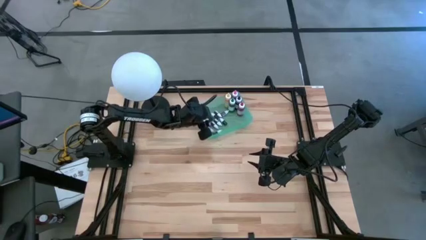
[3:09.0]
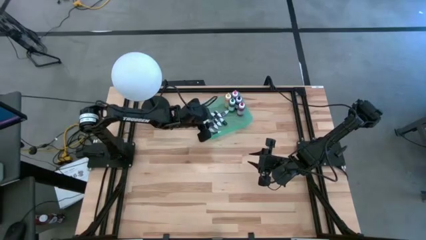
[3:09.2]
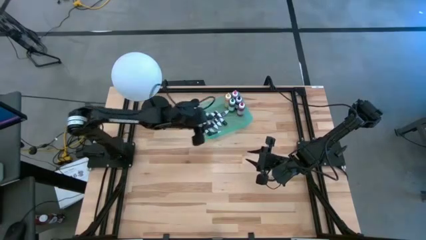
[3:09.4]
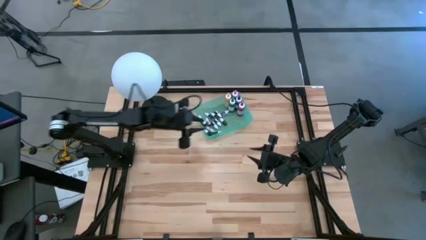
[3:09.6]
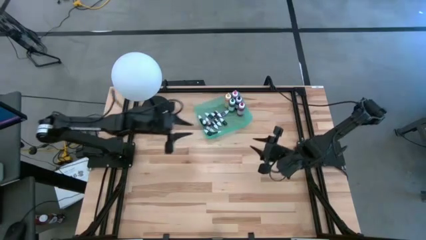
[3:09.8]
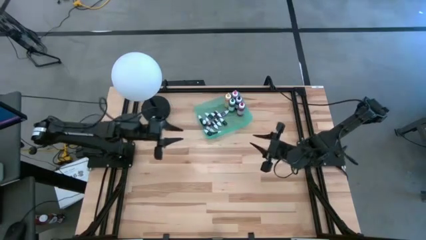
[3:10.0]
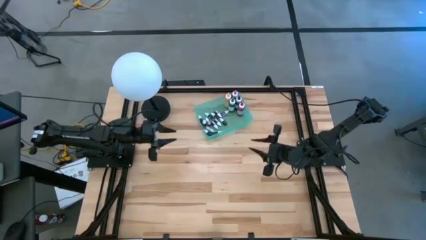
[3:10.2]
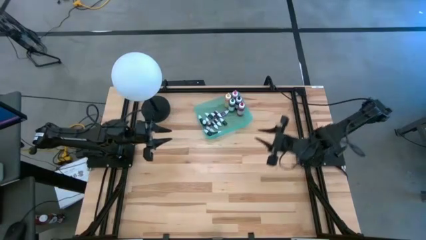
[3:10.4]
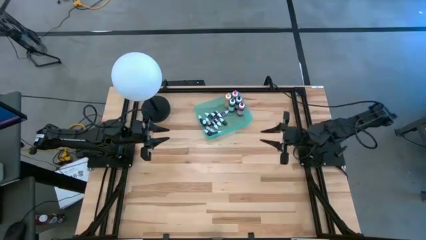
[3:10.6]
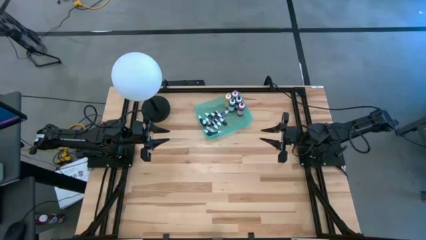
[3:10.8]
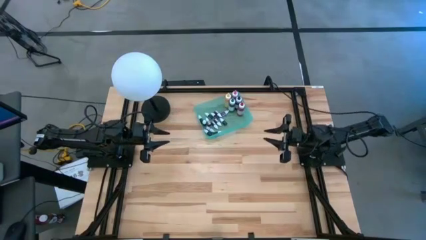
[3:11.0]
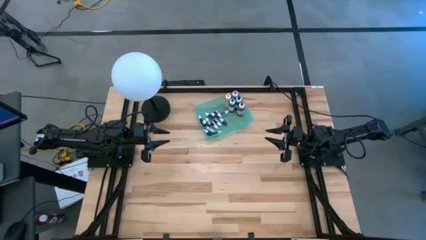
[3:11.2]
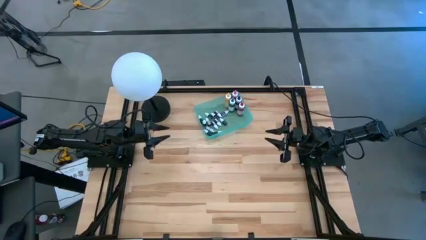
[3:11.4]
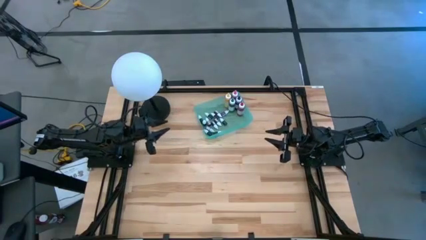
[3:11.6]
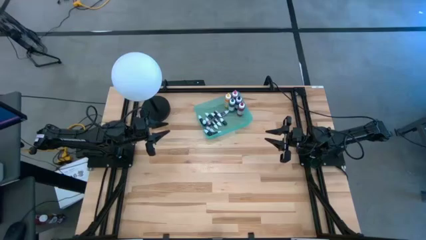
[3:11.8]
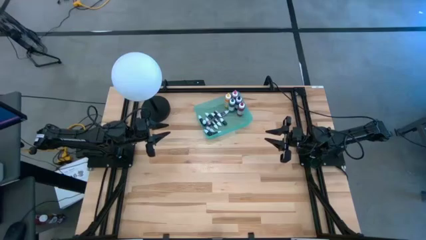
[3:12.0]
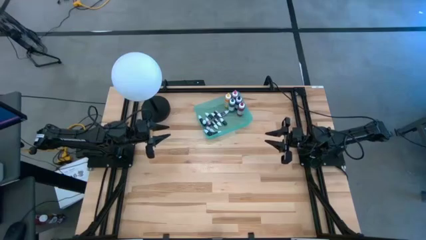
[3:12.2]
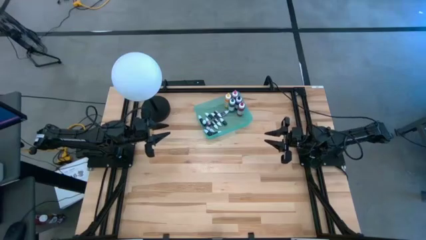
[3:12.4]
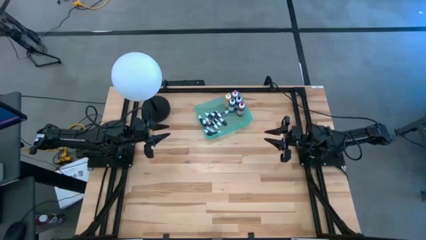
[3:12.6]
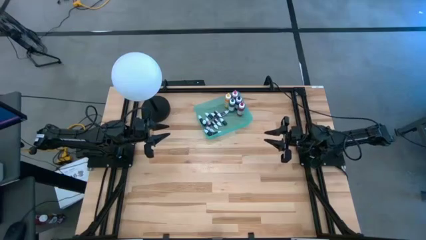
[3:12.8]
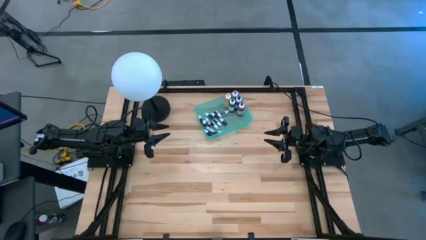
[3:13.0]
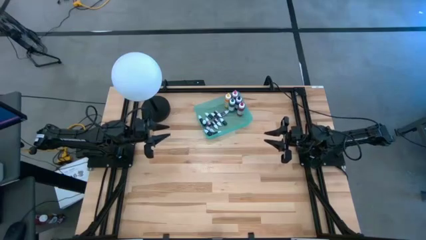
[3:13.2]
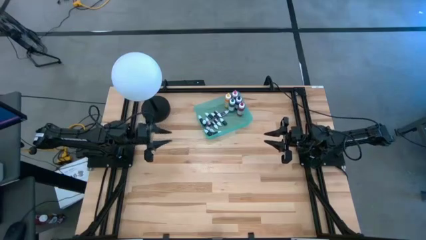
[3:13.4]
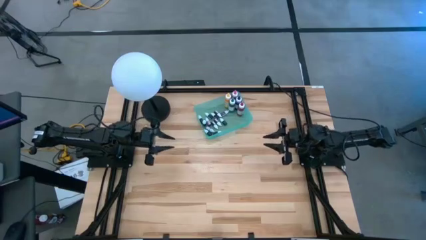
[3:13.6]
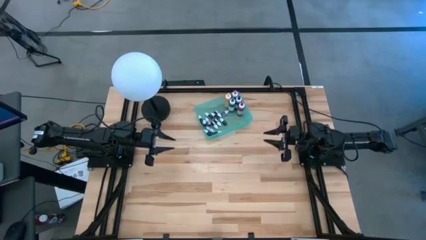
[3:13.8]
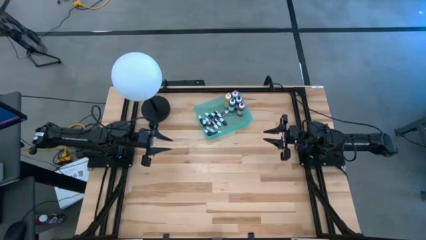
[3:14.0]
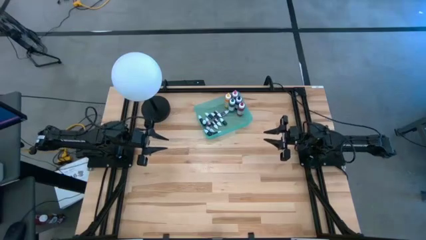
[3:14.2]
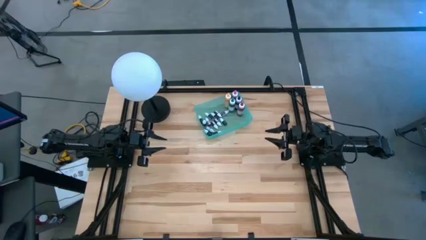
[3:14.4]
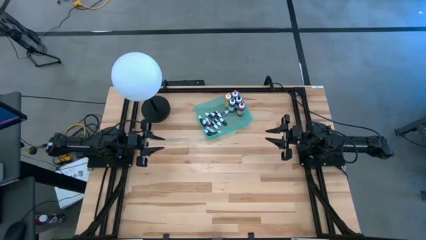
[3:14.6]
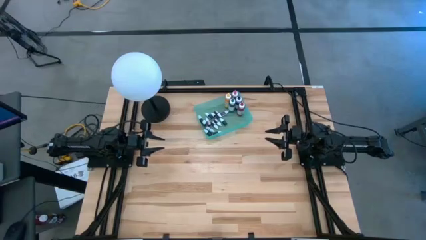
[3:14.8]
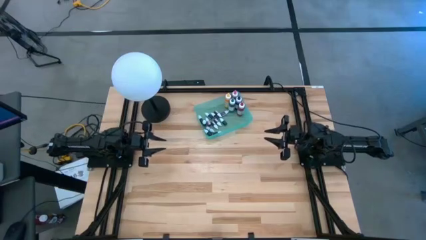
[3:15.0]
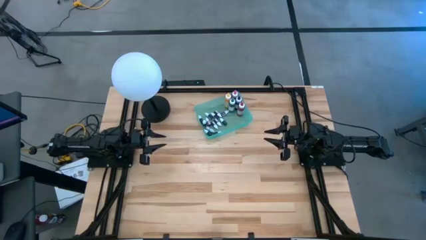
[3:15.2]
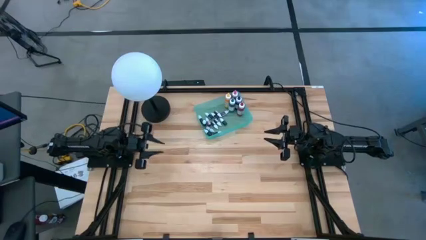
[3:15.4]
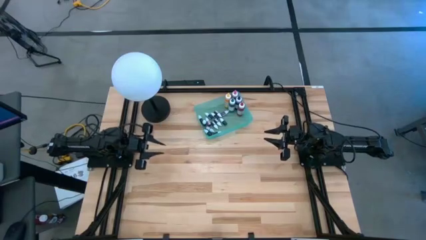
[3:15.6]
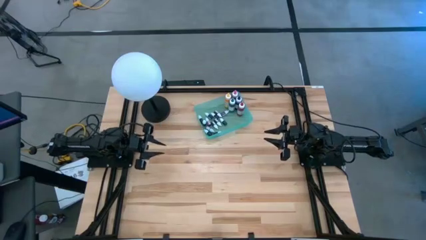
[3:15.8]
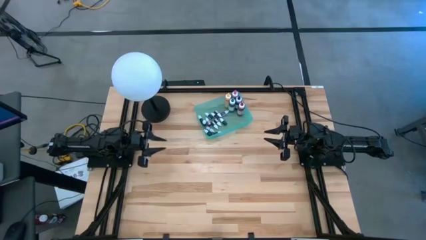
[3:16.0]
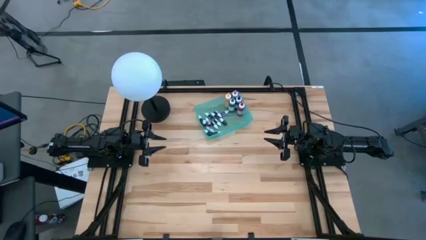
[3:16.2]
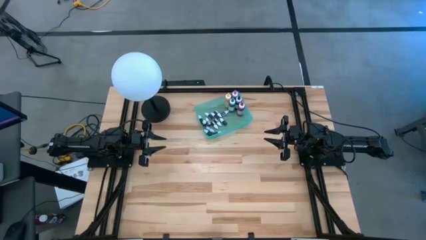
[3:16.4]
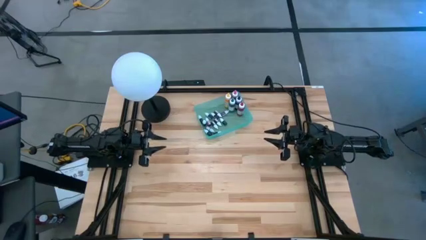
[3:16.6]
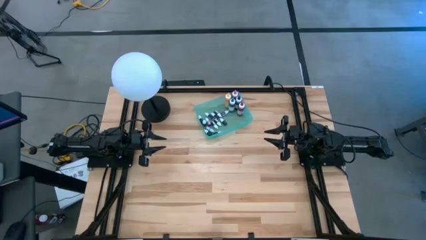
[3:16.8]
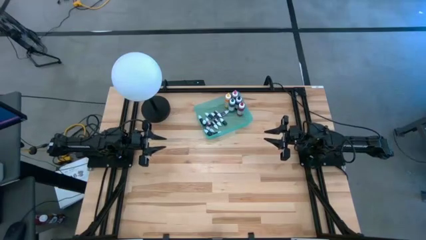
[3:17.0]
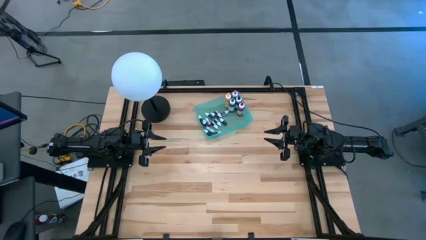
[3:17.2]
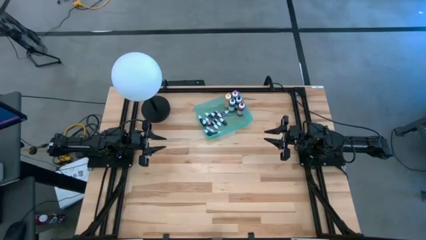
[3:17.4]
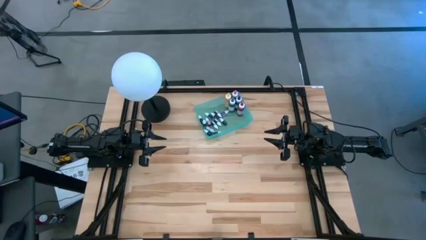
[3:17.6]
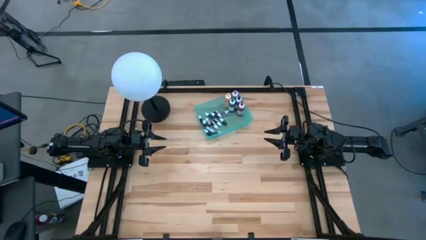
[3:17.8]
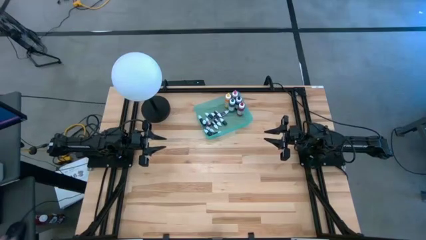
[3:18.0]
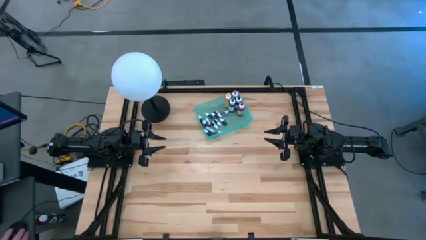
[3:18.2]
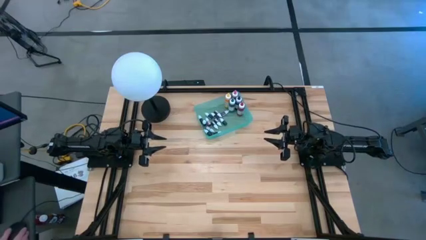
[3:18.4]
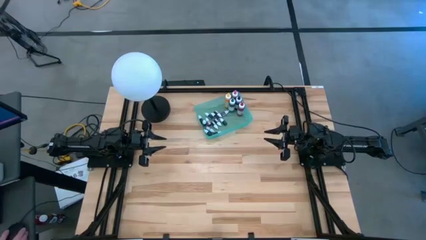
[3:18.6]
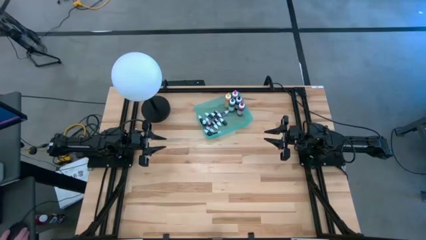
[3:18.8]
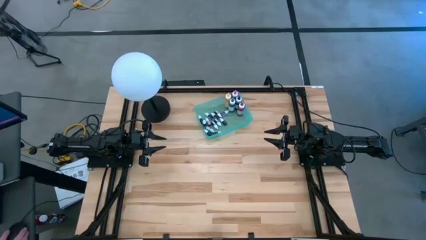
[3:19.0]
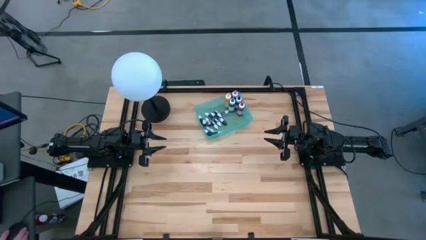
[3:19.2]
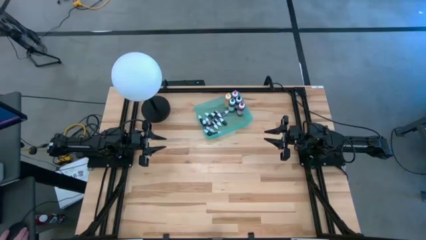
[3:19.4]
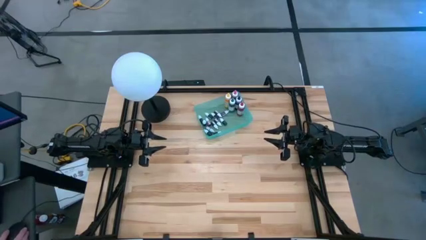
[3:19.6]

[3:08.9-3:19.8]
Task: Pick & Place food coloring
Return to Home Position

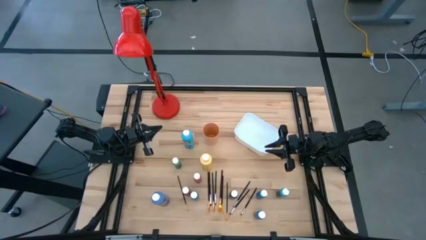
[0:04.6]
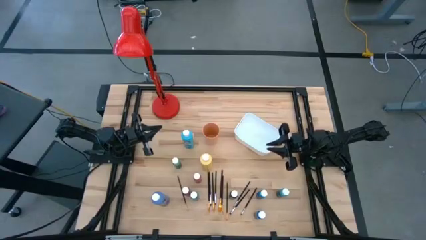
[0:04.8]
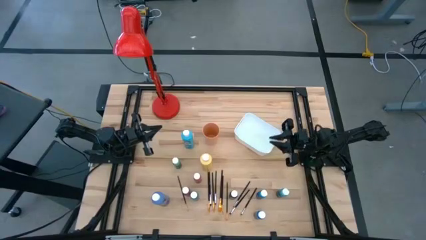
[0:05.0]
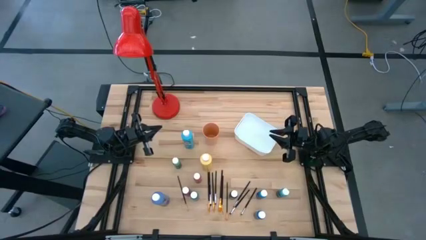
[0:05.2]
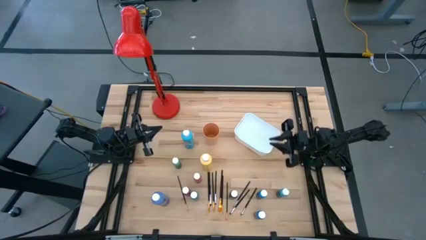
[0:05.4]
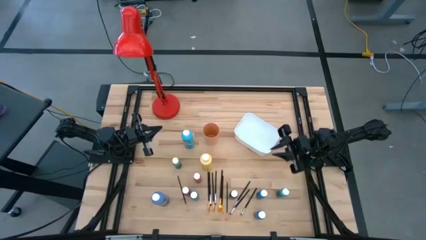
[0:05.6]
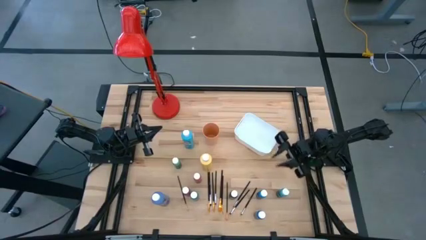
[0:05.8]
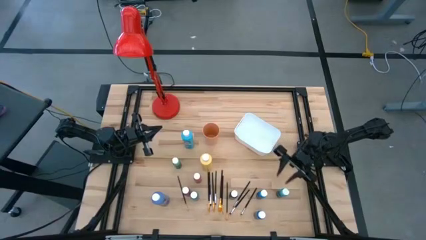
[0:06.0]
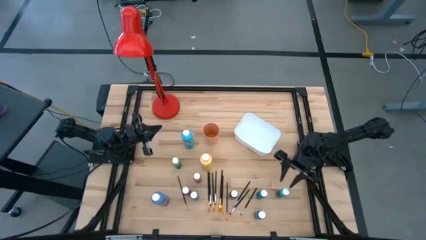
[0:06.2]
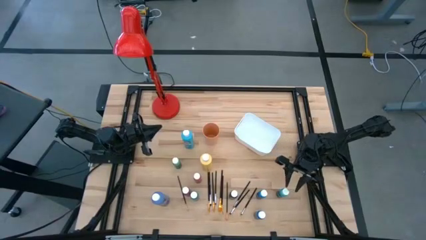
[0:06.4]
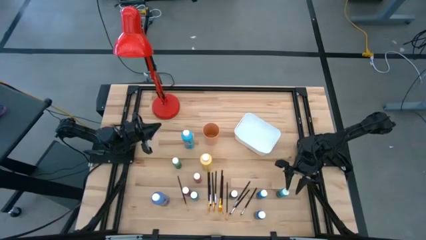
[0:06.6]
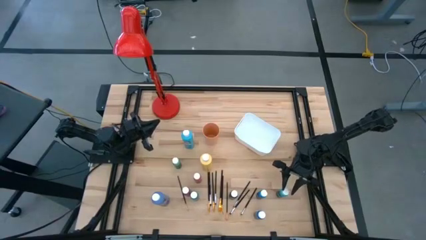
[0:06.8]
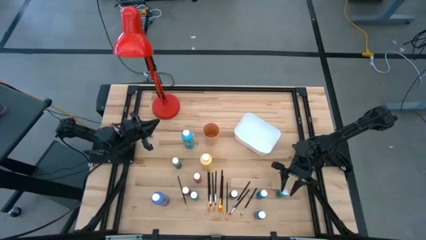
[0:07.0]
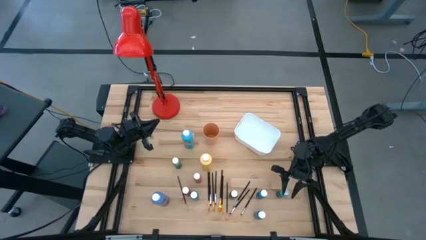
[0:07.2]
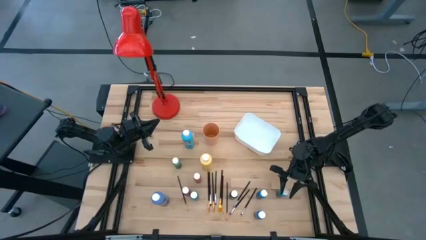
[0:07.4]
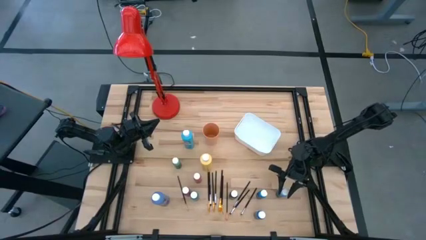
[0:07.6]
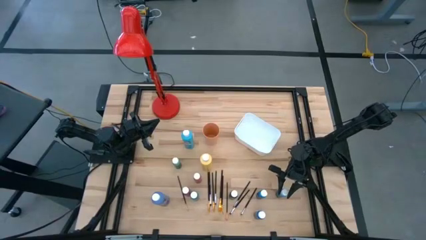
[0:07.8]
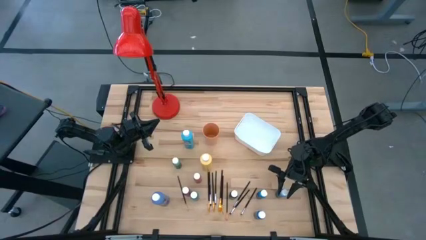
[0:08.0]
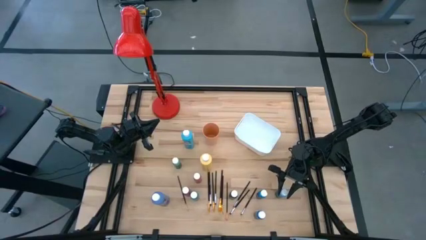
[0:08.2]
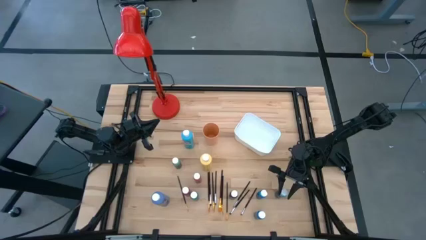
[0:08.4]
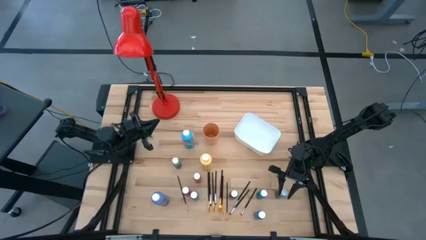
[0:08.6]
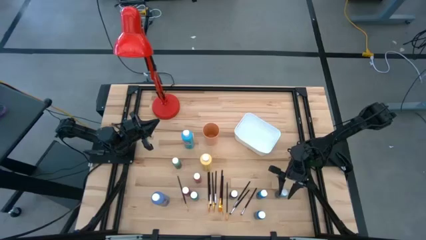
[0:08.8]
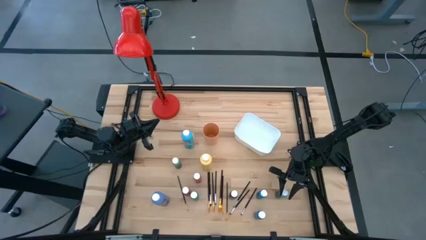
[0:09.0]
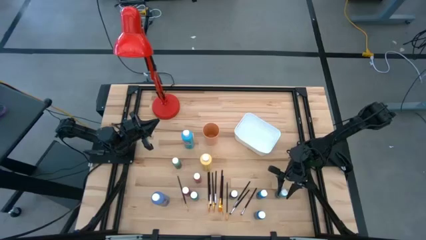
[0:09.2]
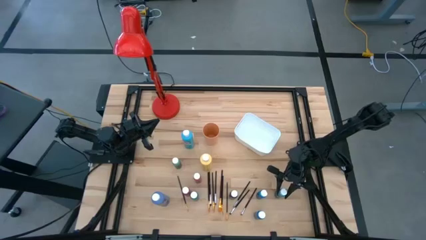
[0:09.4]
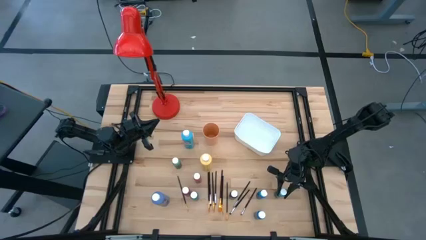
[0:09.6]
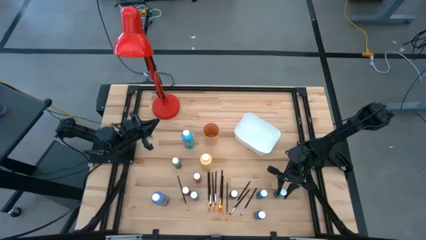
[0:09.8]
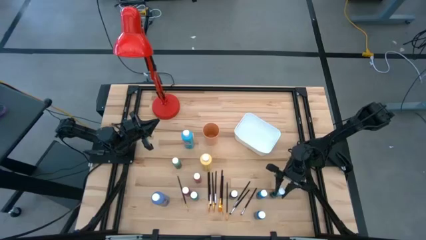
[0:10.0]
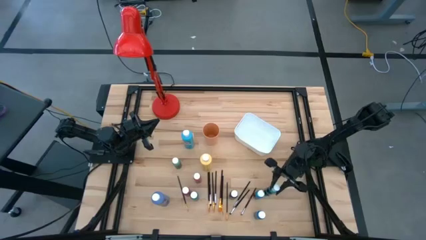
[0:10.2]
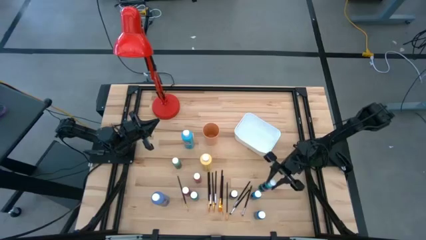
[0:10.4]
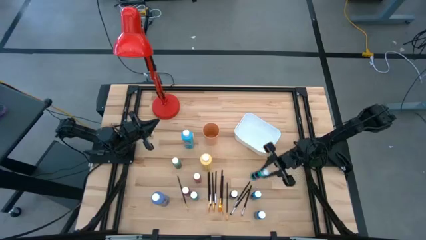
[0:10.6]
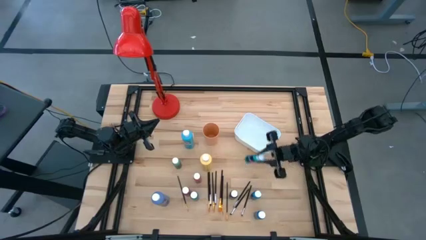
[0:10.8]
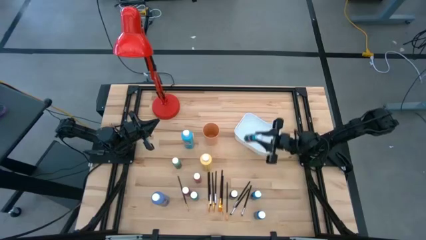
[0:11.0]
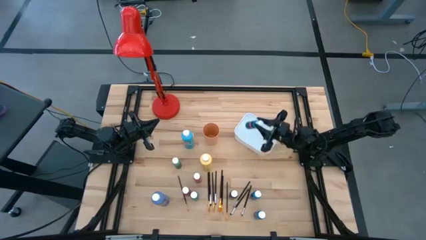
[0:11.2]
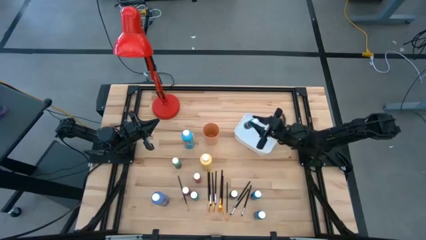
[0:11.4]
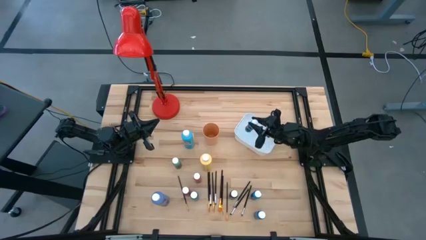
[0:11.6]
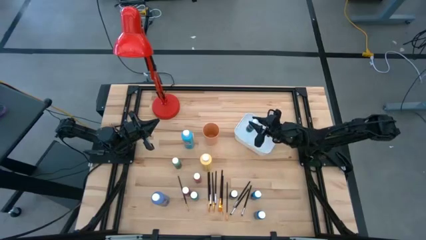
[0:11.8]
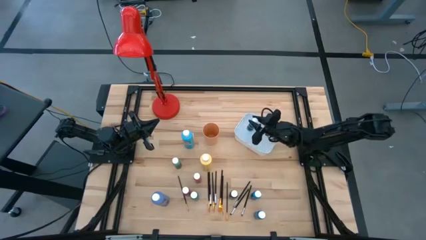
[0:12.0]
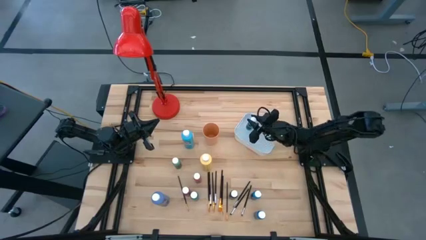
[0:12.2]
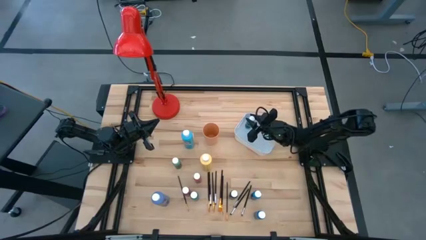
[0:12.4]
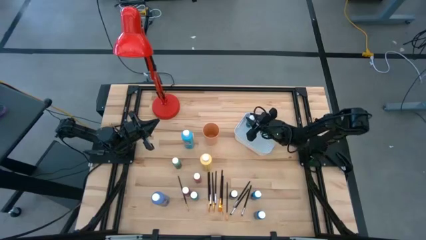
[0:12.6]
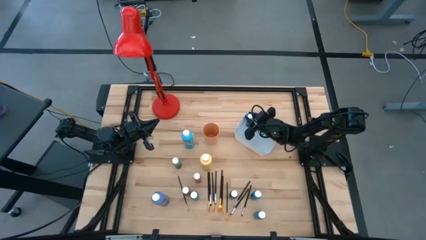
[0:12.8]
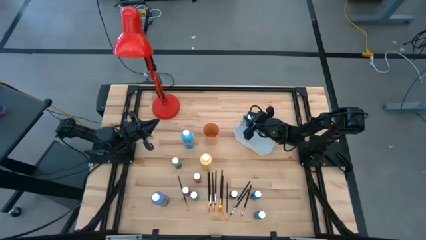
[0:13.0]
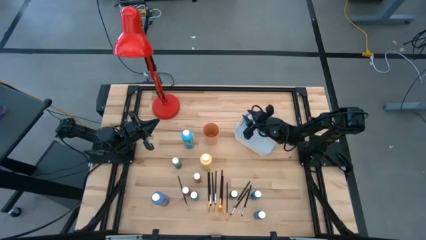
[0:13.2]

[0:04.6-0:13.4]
Task: Pick & Place Paint Supplies
Put the light green paint bottle into the white bin
